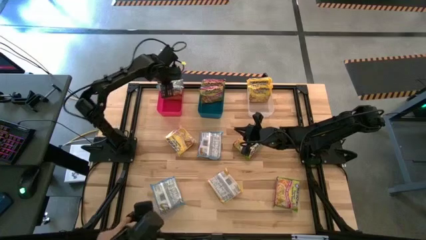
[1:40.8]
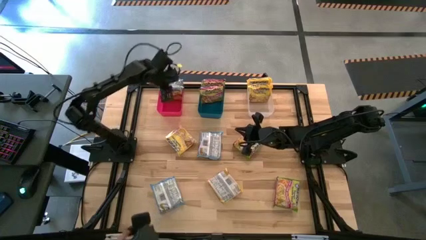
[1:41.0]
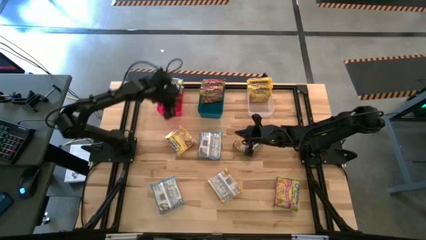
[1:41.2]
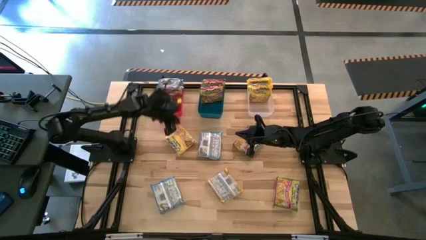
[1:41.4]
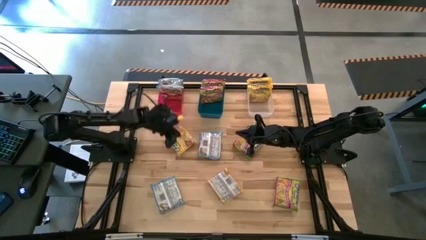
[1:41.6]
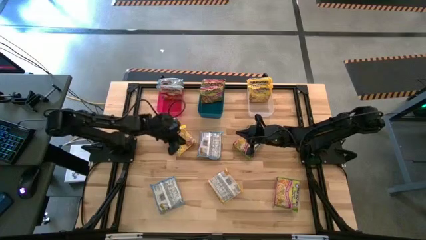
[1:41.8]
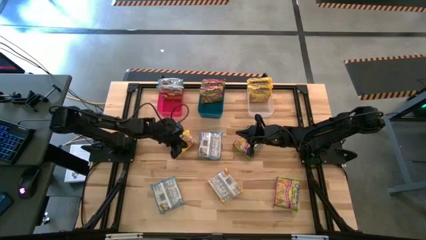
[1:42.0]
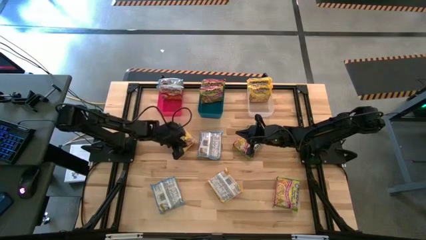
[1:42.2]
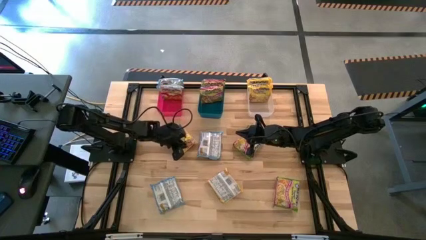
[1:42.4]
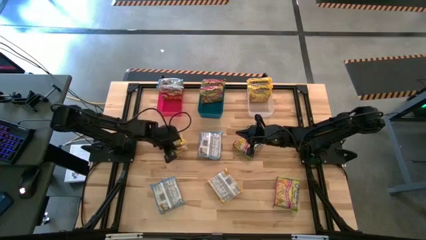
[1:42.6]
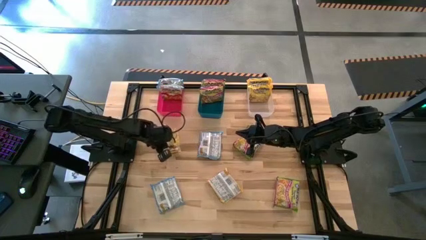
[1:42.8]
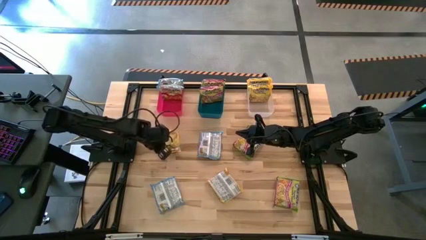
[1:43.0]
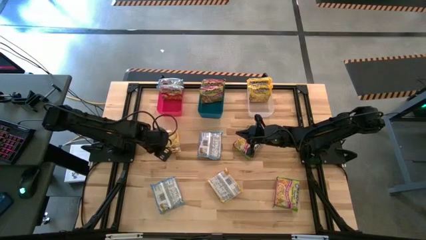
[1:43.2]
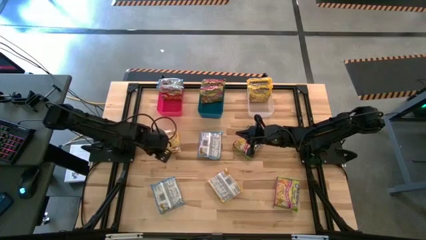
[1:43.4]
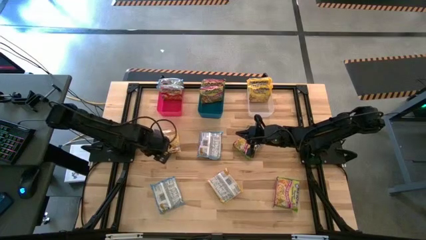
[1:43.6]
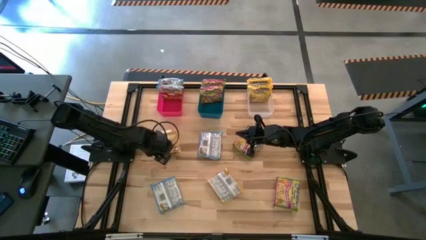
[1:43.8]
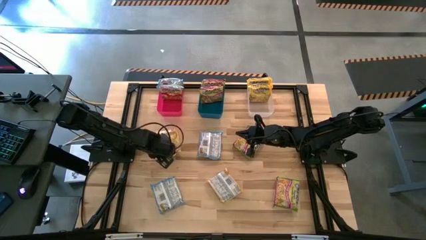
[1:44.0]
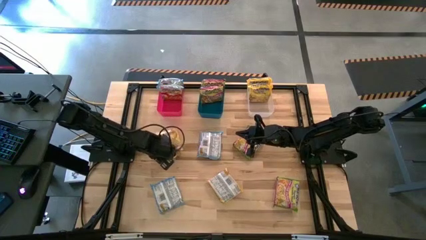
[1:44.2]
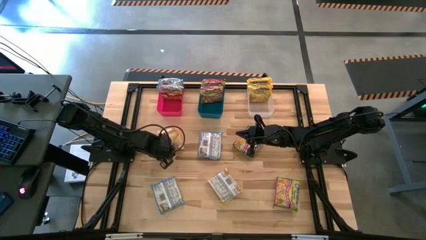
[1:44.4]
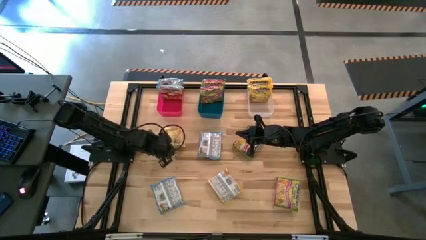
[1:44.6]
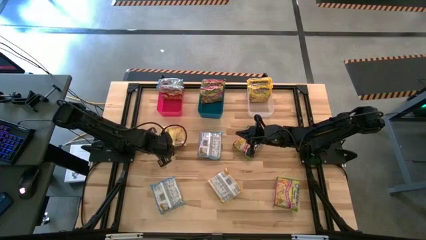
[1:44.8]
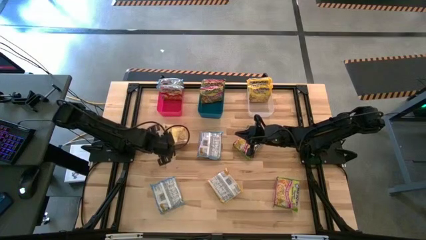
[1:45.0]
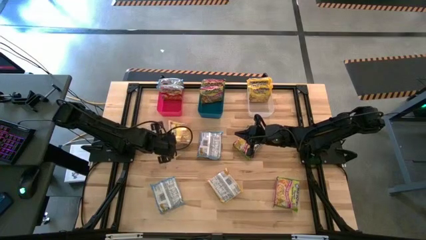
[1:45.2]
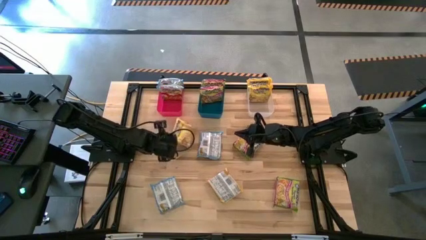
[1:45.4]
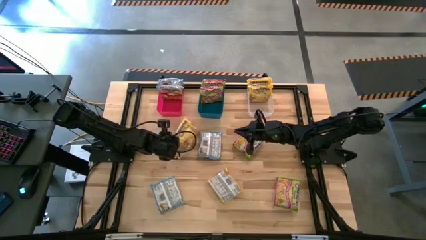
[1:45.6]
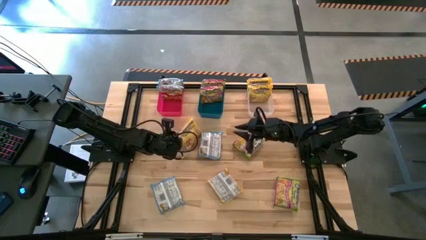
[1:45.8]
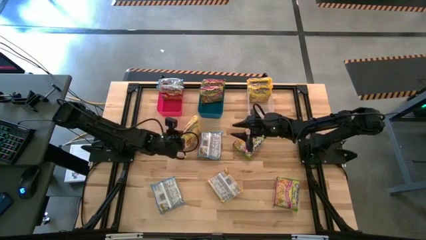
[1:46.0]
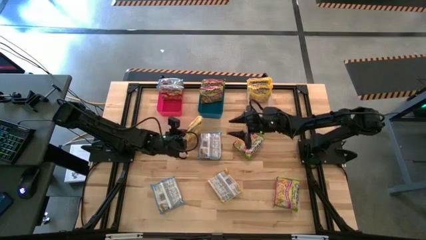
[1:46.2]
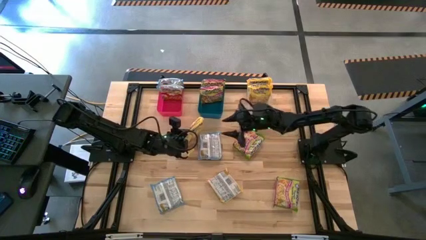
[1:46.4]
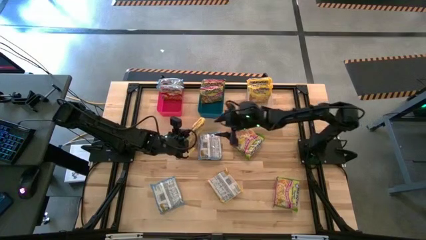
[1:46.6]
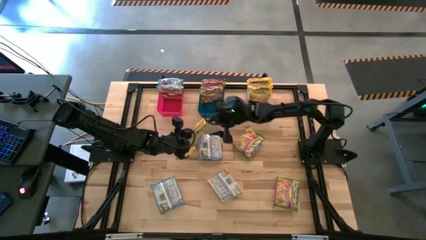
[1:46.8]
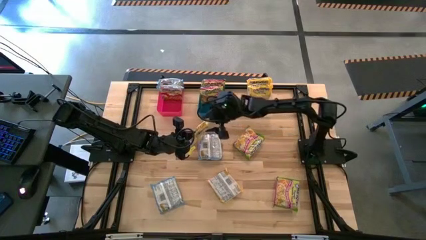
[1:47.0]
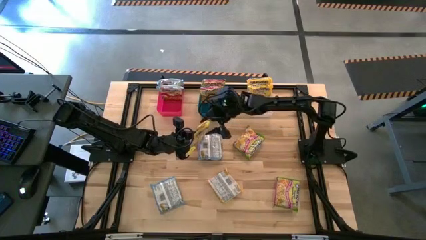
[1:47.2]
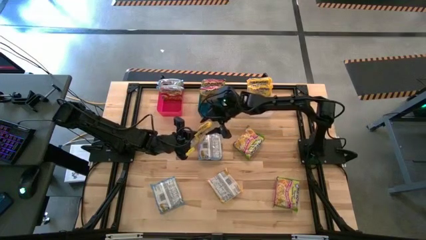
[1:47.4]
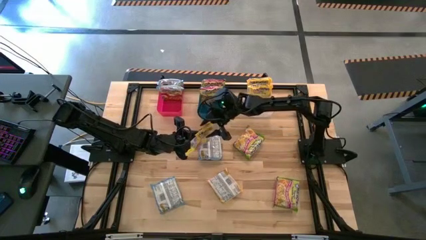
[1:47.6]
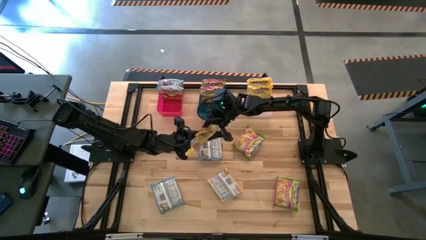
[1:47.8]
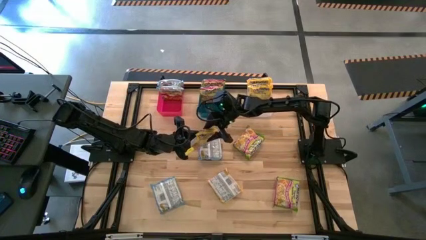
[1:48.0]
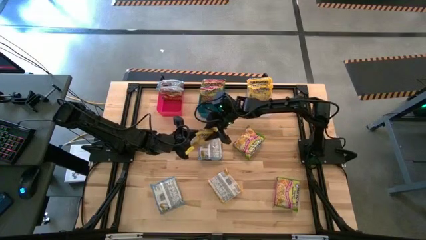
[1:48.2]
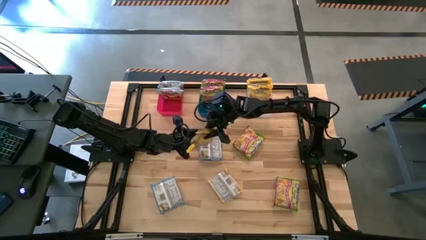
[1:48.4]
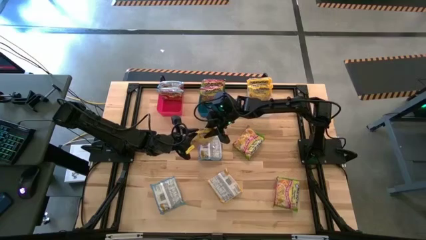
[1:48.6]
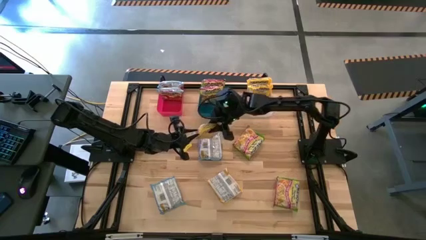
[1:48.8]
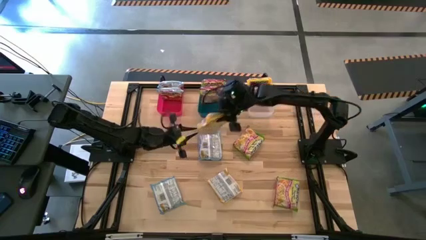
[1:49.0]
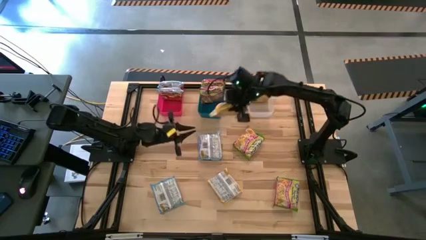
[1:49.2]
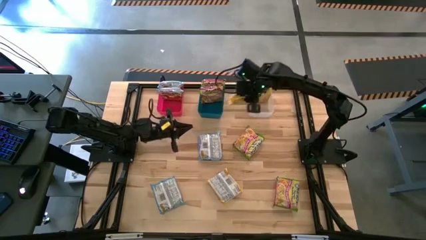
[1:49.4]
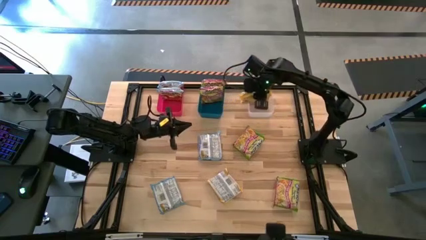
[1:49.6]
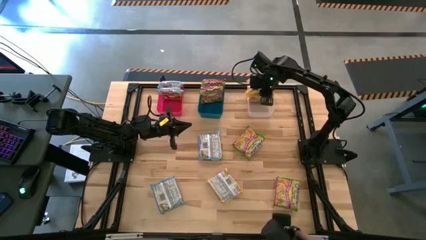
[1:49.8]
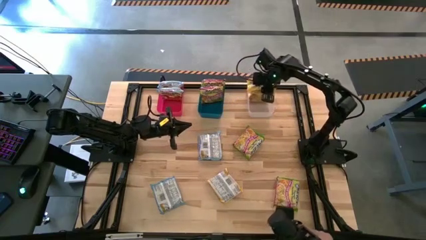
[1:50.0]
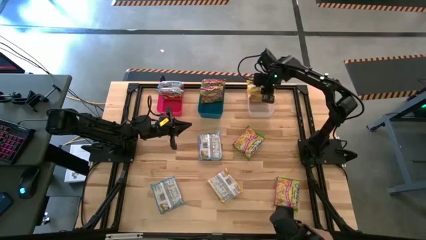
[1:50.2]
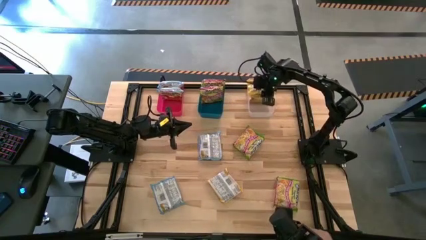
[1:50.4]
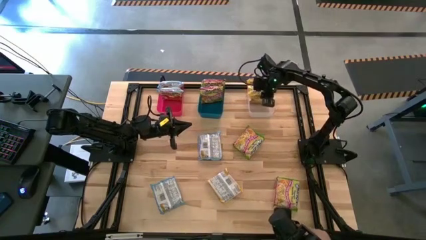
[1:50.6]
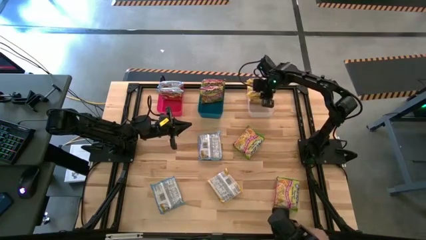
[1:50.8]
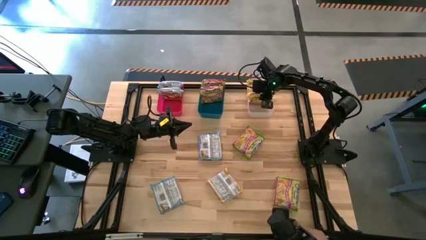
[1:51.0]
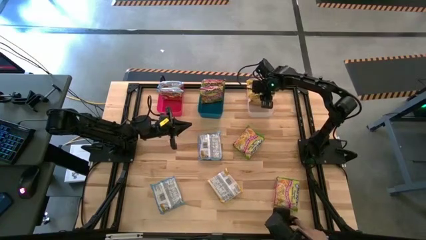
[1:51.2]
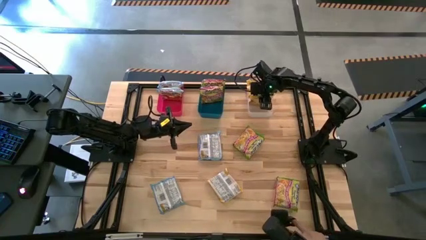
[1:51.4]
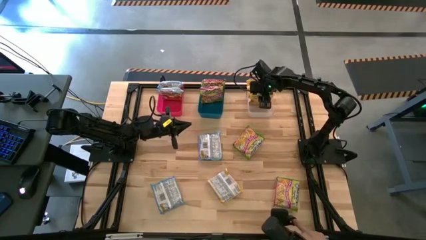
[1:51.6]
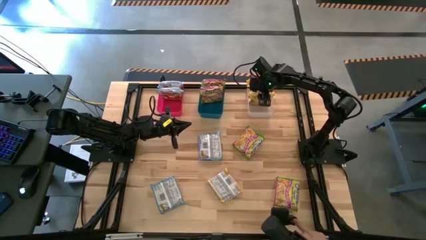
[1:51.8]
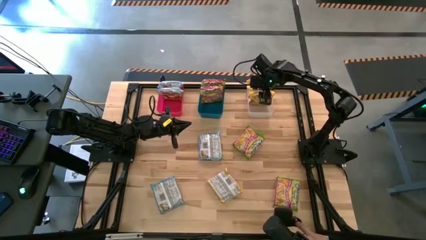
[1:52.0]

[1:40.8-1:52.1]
Task: Sort Maruchan noodles
Put the top yellow noodle pack into the transparent bin
